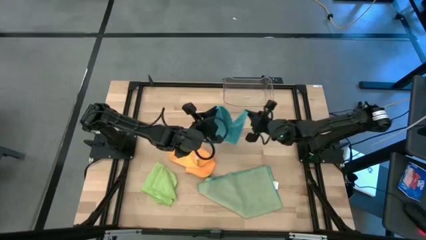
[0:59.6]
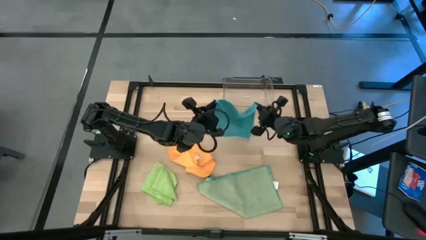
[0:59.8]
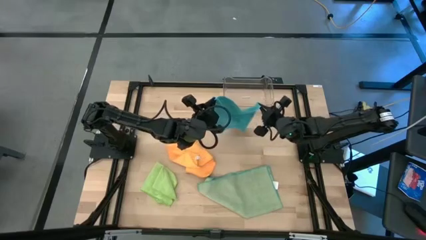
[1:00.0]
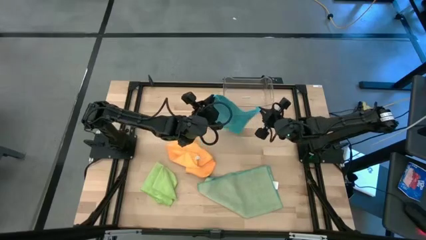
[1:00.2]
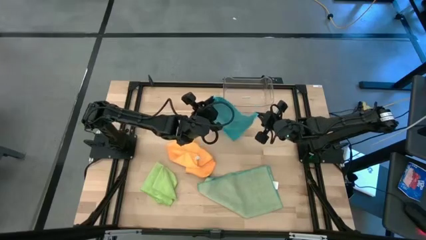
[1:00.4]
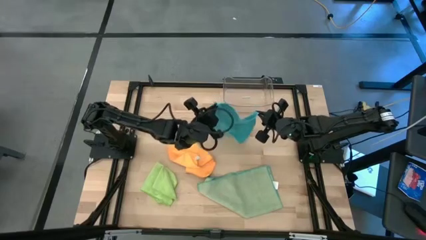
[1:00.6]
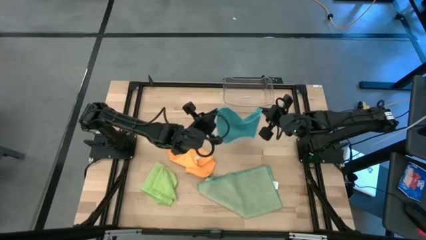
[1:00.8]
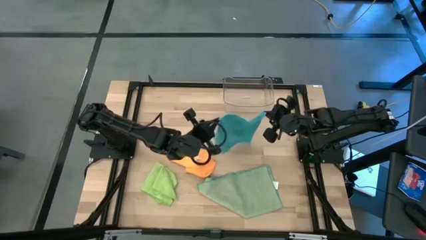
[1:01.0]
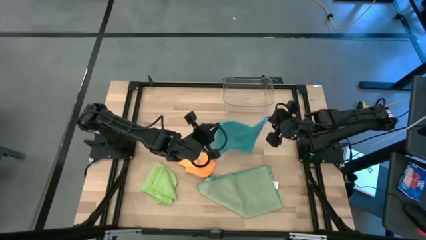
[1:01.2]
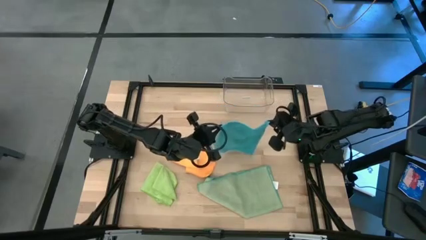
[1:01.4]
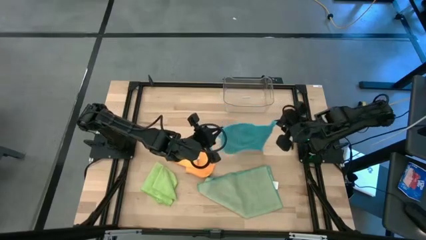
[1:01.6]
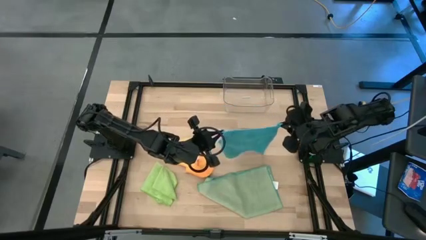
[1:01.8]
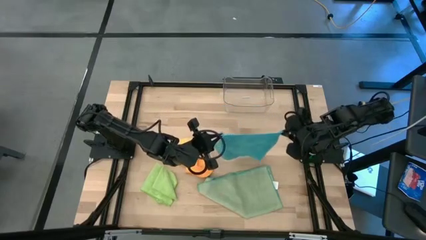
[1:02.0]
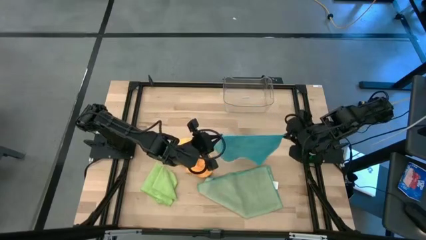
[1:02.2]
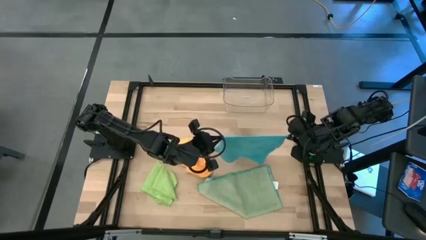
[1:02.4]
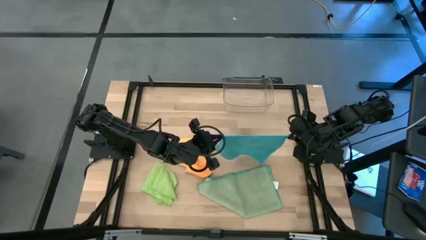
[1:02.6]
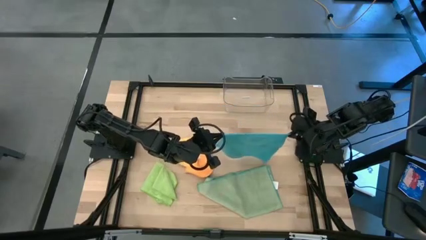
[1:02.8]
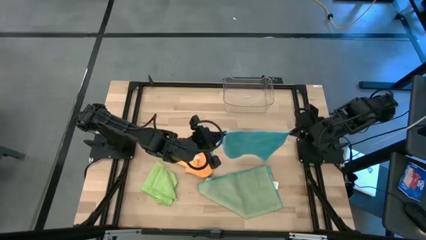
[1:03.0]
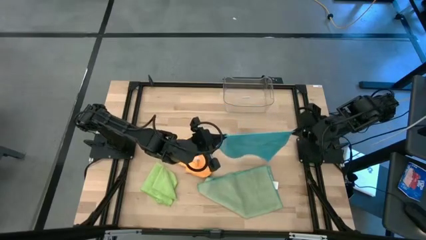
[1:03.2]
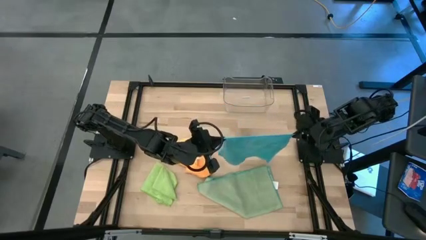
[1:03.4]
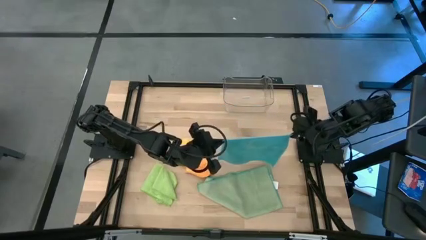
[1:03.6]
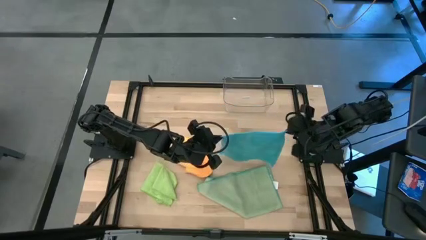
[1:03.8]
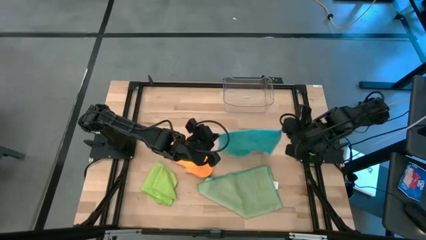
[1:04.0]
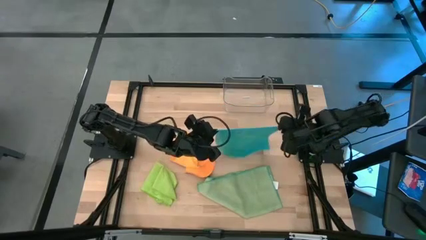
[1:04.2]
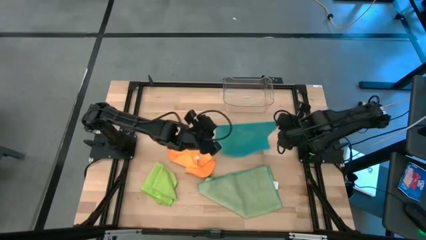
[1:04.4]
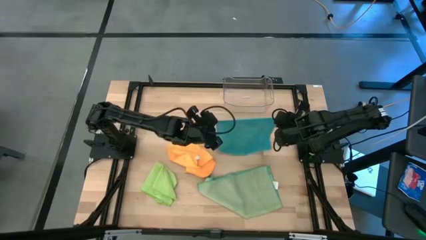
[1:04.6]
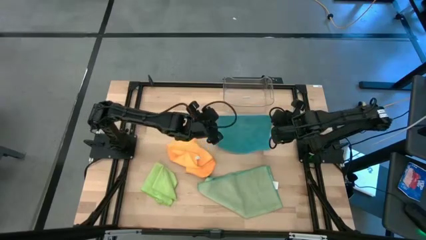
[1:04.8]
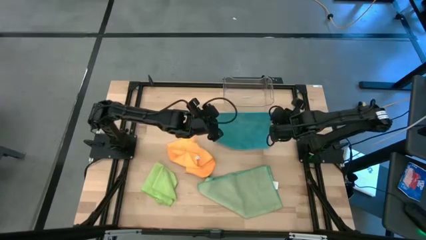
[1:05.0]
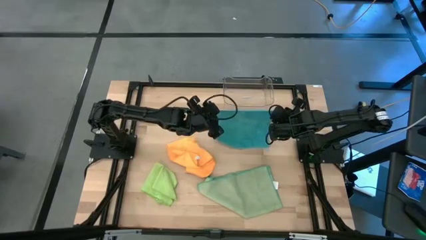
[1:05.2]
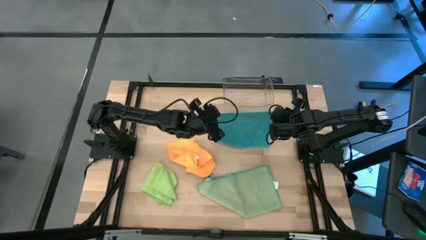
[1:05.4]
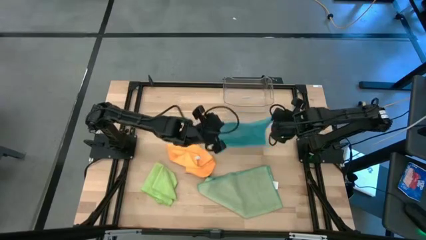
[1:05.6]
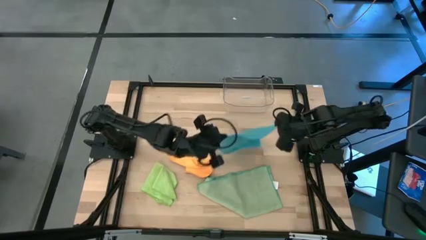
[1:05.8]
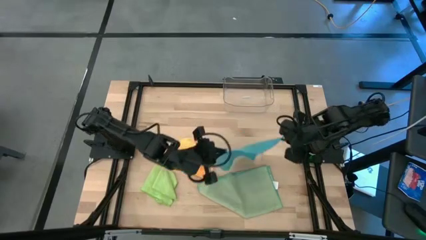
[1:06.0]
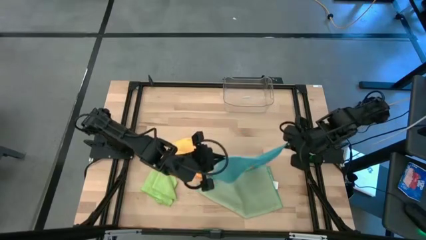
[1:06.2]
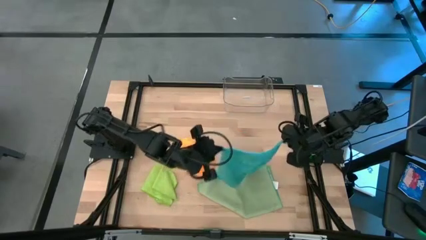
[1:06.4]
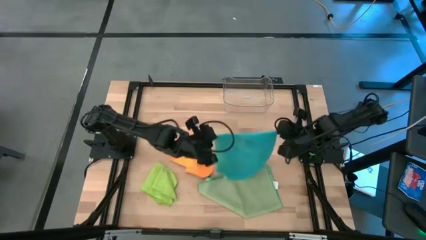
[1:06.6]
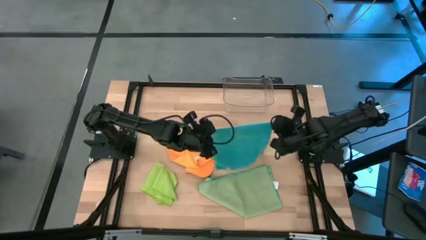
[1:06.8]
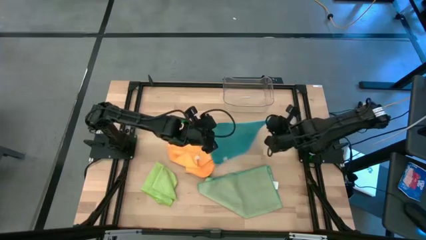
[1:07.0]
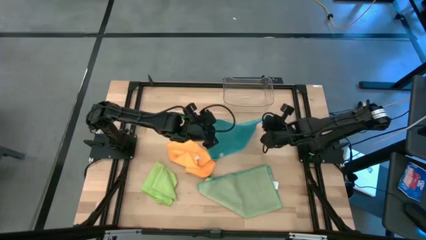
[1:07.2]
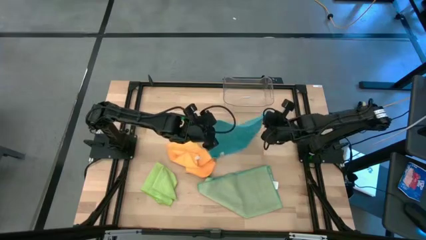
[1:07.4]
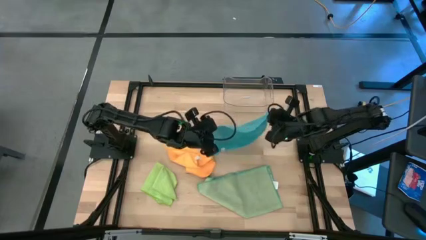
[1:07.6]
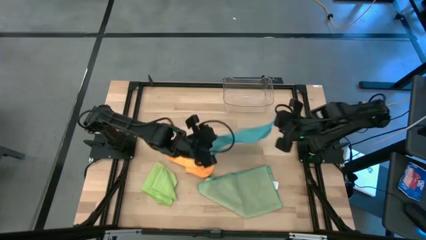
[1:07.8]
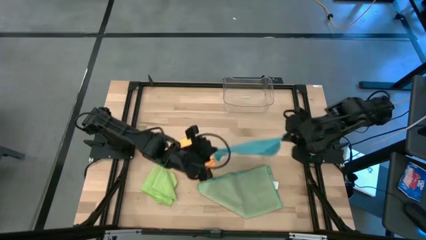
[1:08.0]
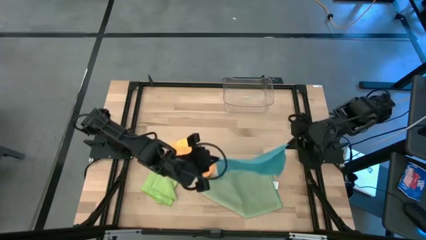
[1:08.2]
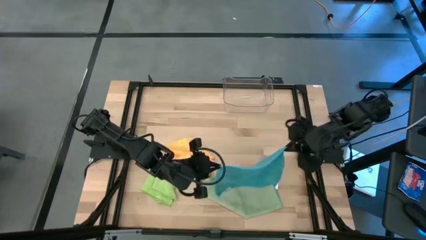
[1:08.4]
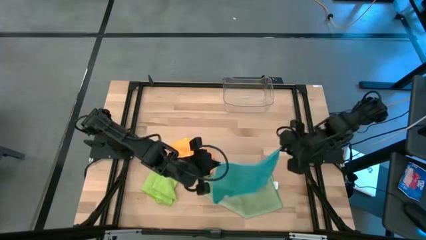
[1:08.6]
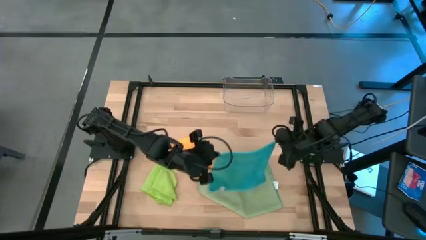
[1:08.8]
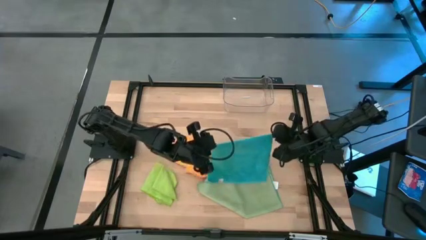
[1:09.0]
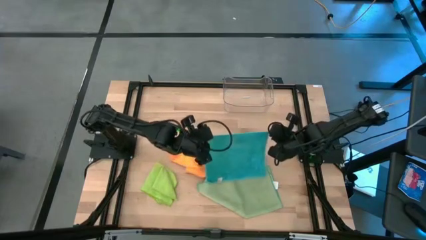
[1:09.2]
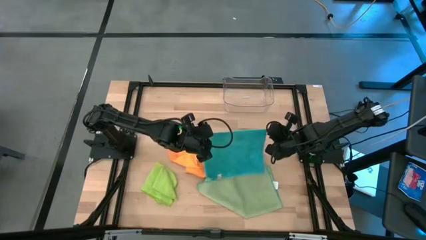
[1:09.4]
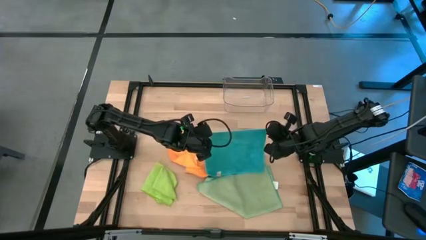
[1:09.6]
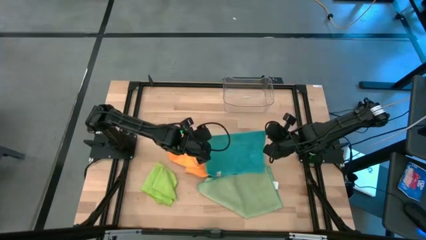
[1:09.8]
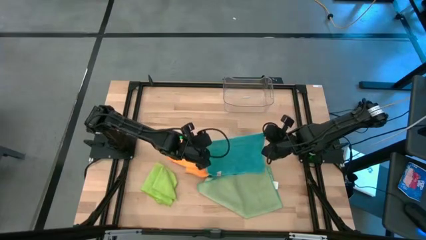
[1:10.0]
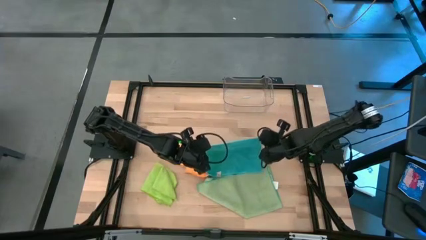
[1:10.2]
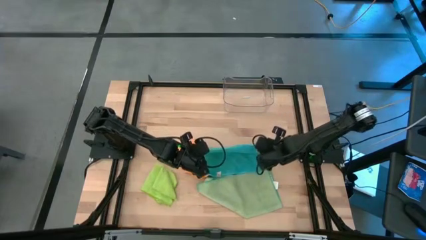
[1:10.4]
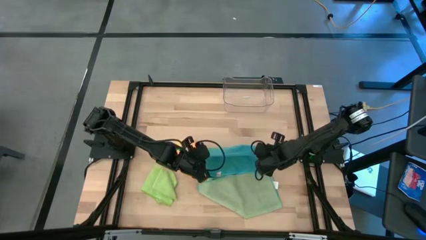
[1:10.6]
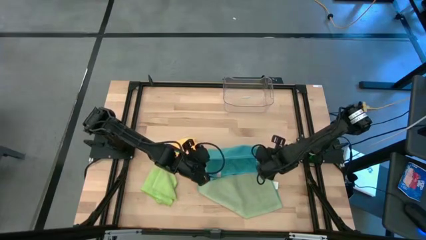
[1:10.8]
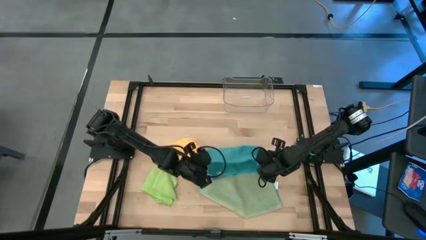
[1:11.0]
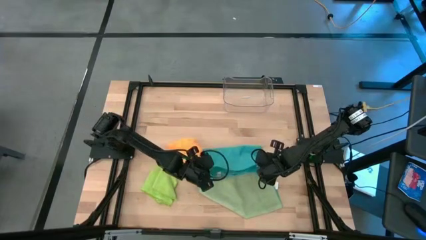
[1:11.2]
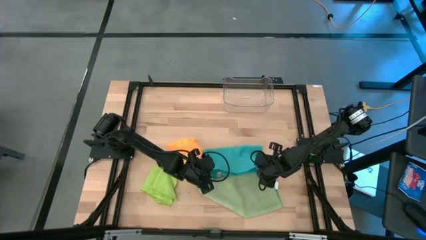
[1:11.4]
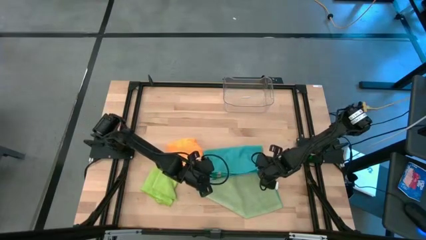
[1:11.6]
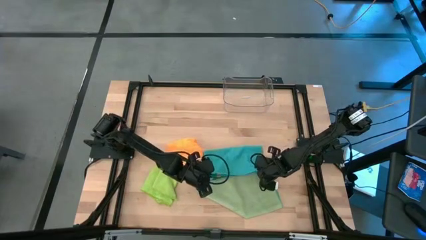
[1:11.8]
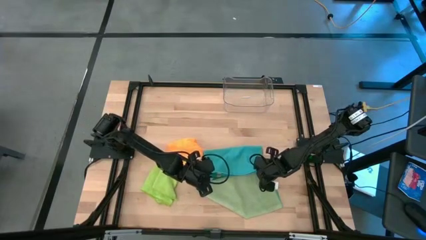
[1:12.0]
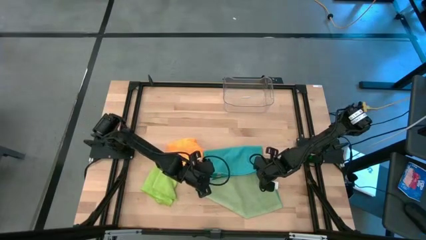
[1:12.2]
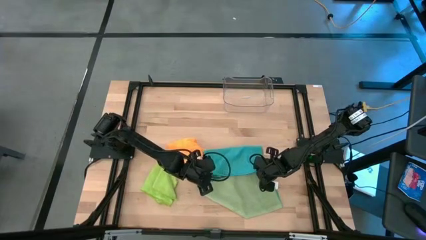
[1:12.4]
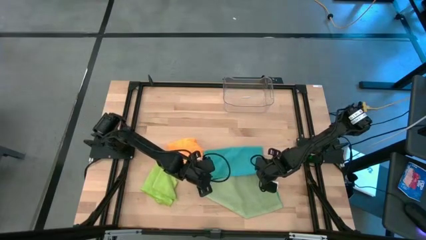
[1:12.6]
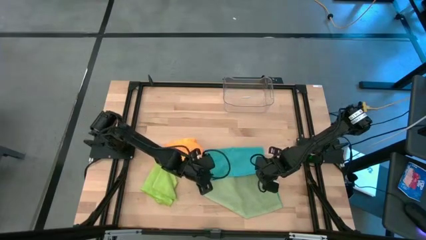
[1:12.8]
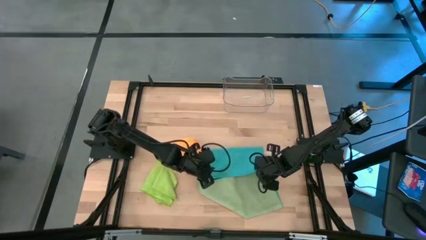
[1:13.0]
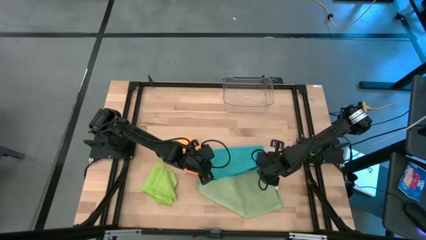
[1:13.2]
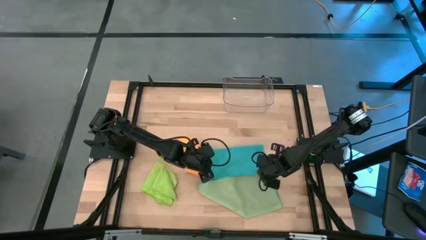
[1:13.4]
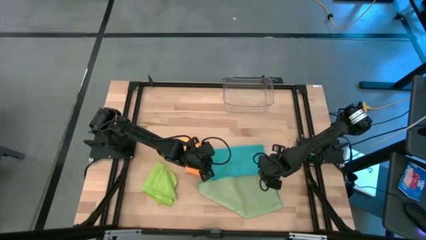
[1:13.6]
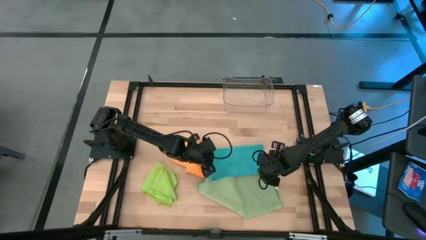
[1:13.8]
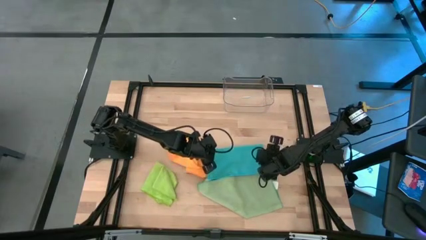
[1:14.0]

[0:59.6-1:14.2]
Task: Fold microfiber towels
Fold the blue microfiber cloth
